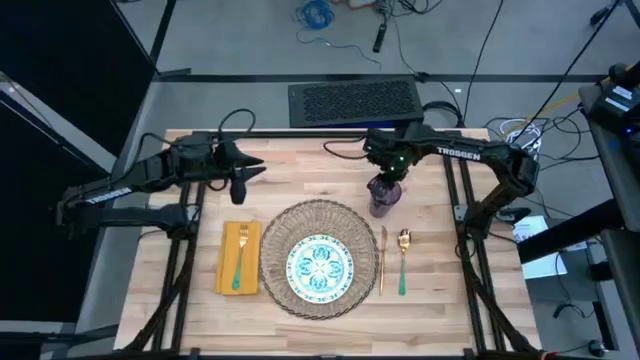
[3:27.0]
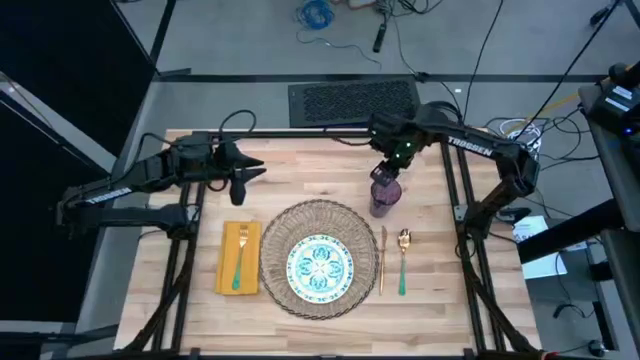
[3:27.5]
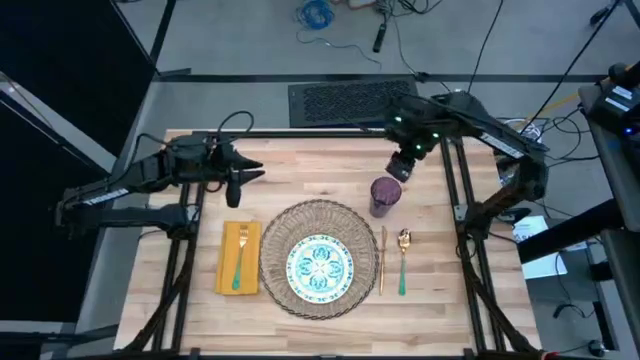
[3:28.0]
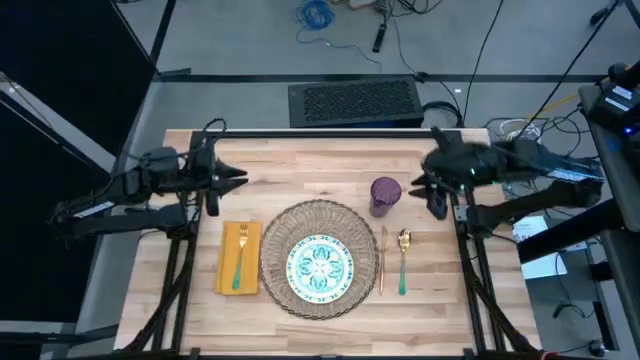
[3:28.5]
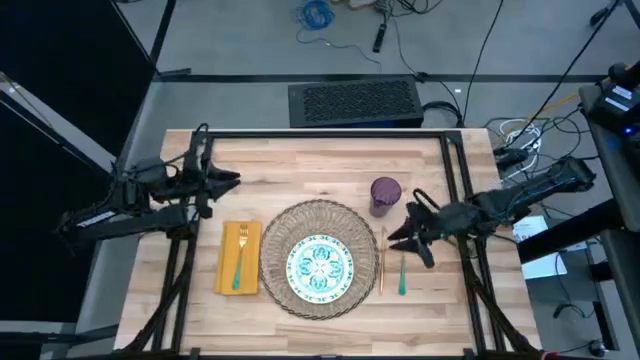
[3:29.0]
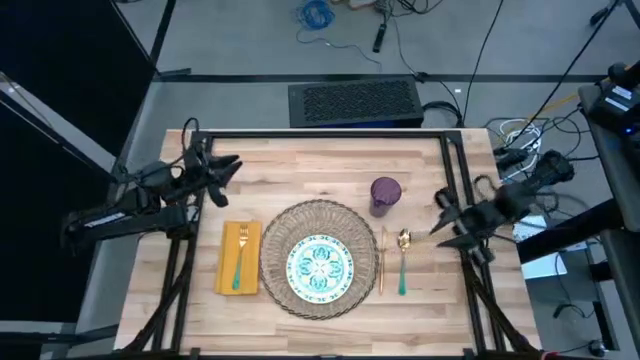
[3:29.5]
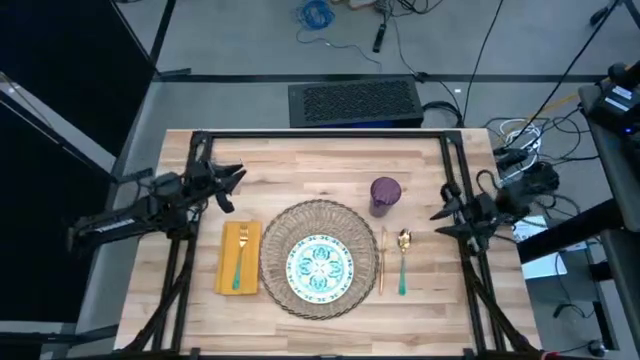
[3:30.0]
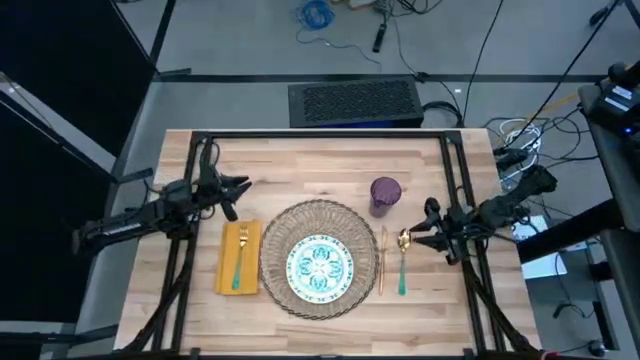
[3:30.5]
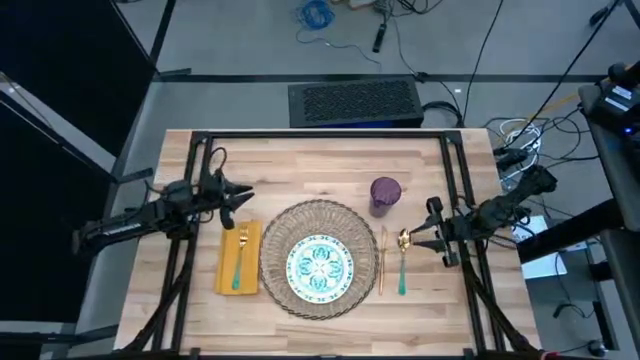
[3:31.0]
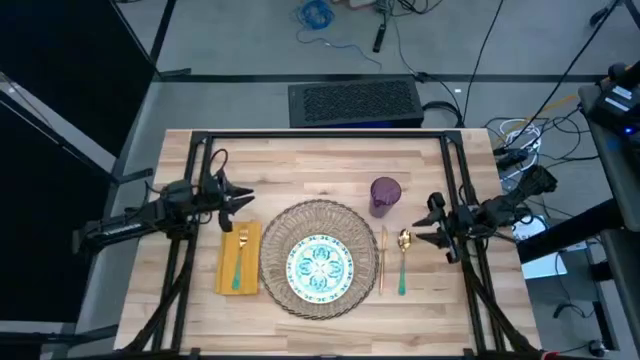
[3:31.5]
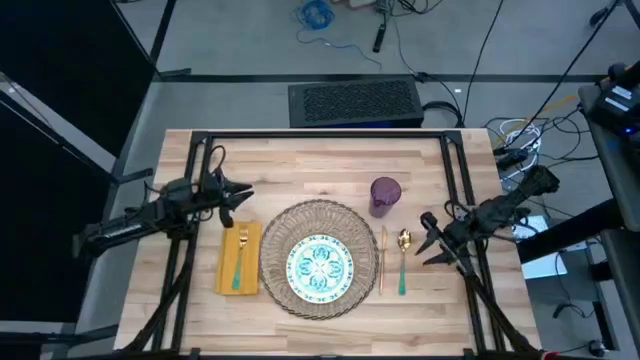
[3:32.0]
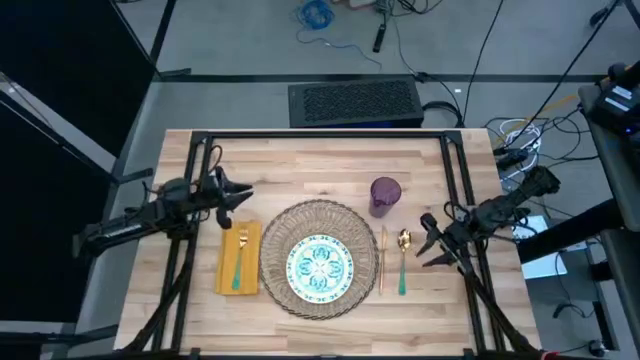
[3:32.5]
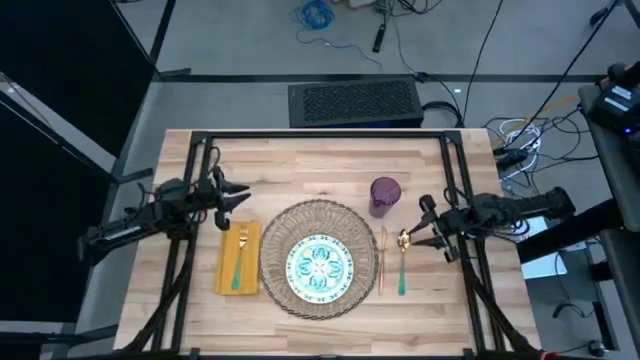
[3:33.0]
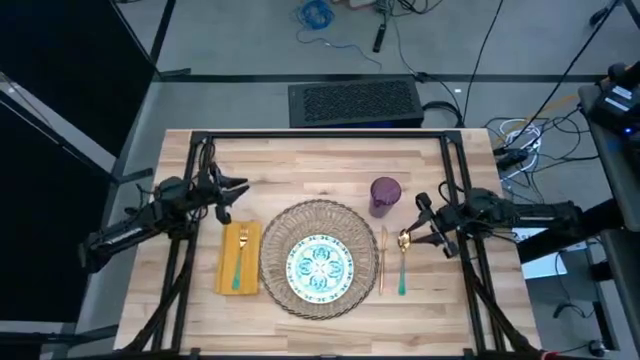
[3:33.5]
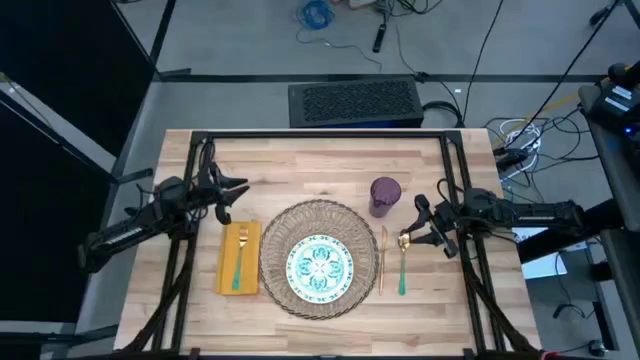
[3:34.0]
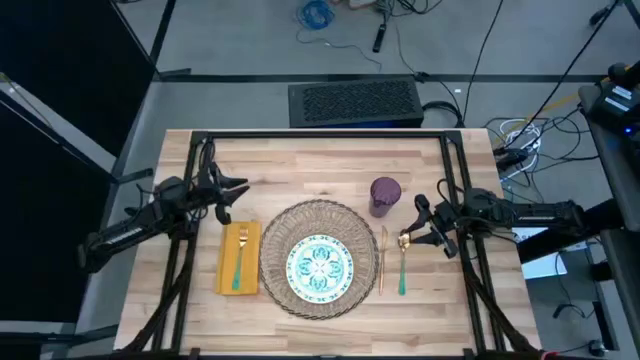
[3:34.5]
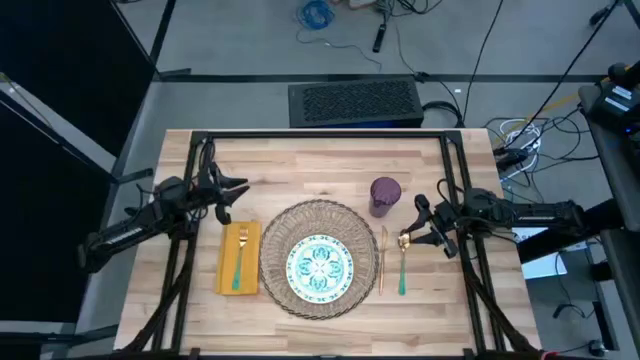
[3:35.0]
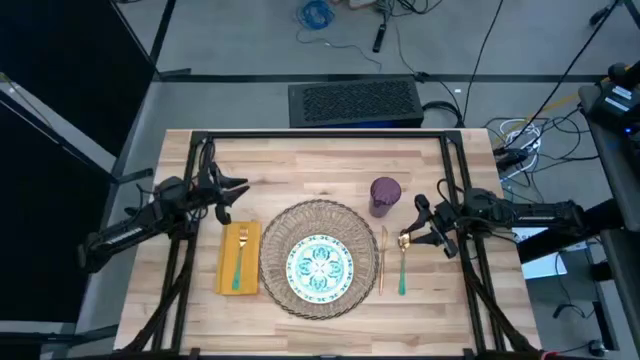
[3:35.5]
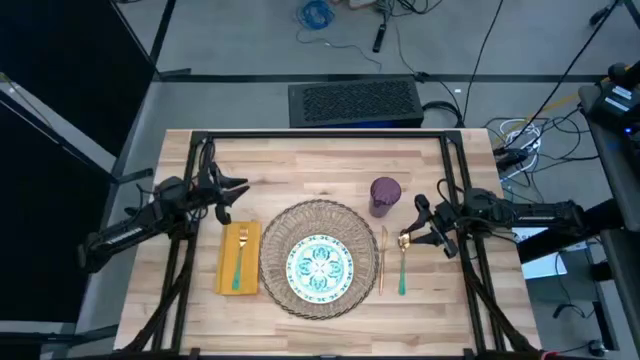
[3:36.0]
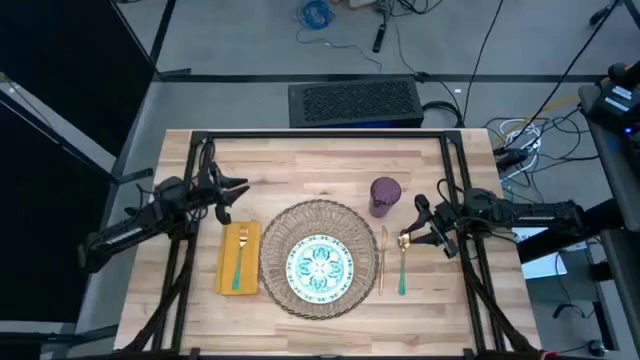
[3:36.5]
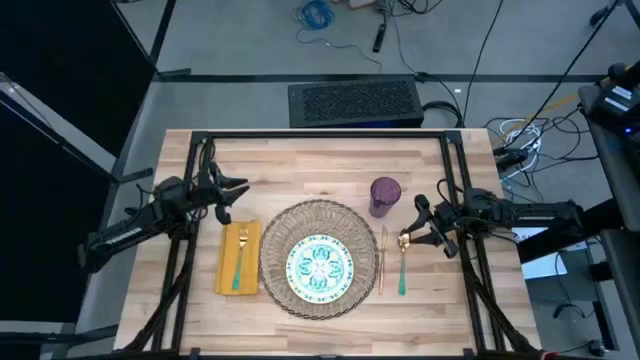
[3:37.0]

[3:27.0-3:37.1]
Task: Set table place
Return to Home Position

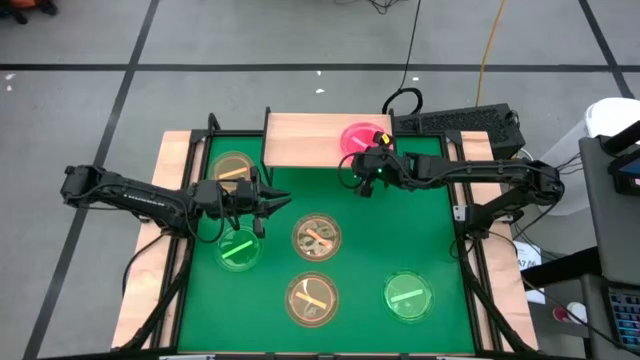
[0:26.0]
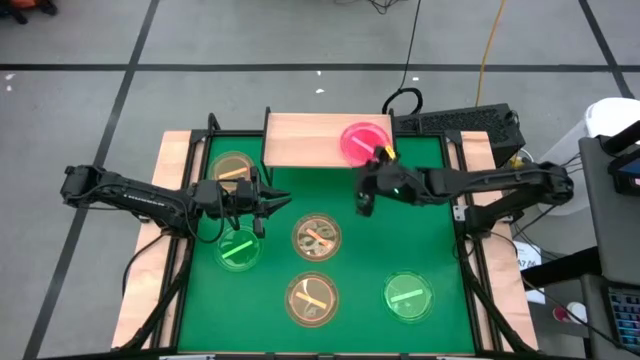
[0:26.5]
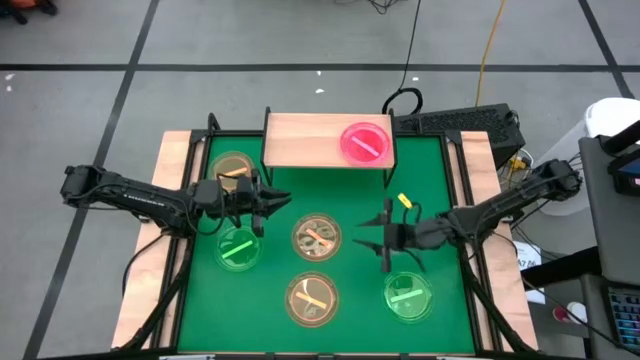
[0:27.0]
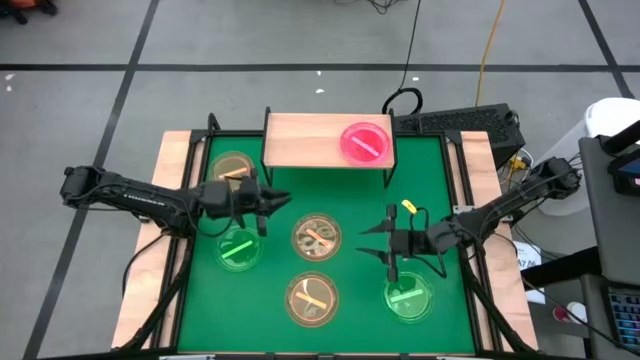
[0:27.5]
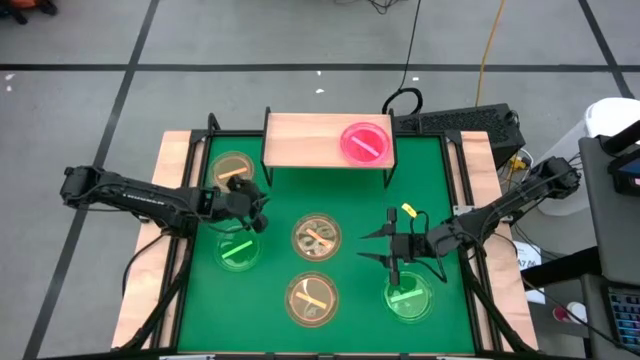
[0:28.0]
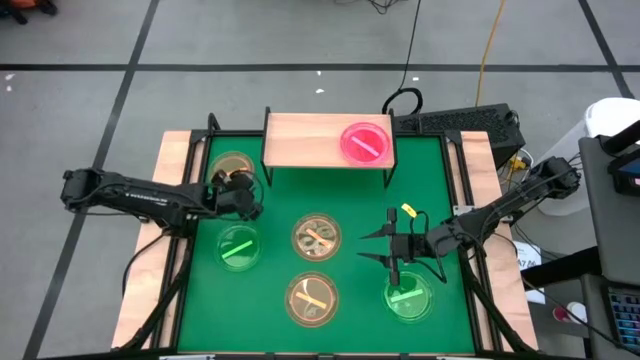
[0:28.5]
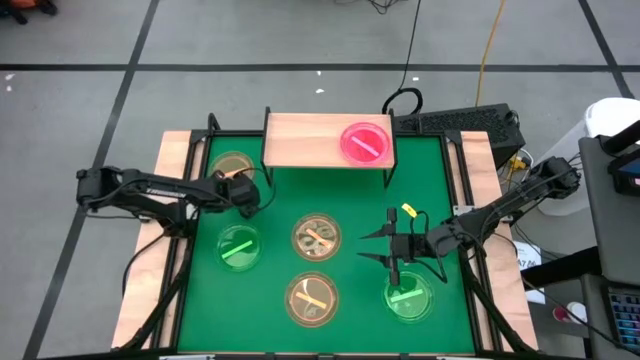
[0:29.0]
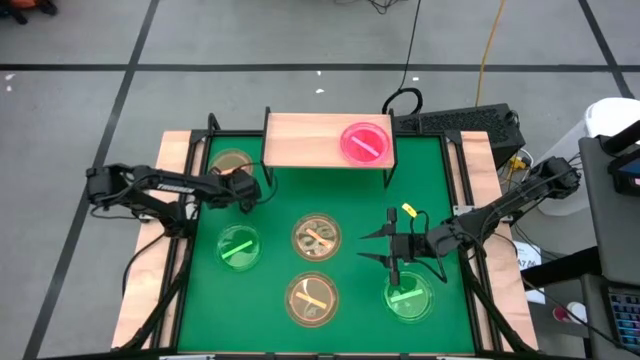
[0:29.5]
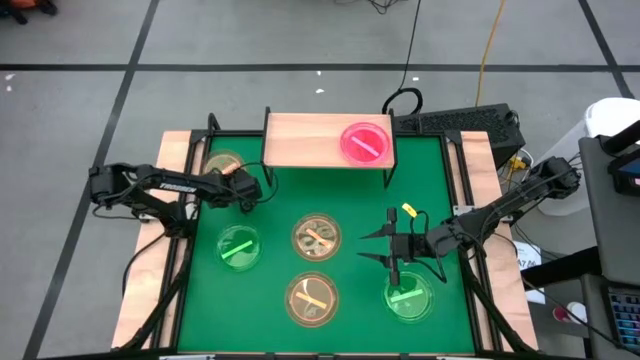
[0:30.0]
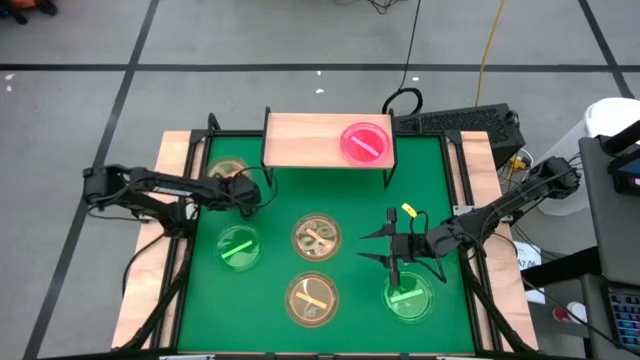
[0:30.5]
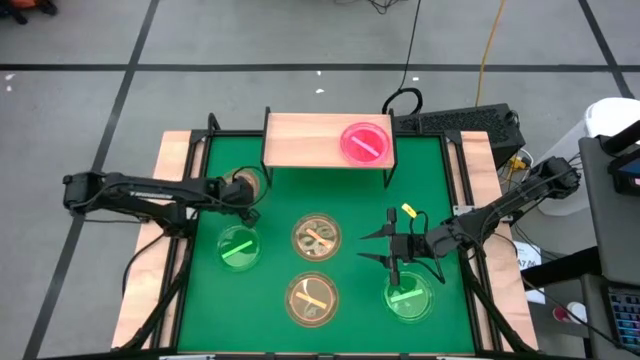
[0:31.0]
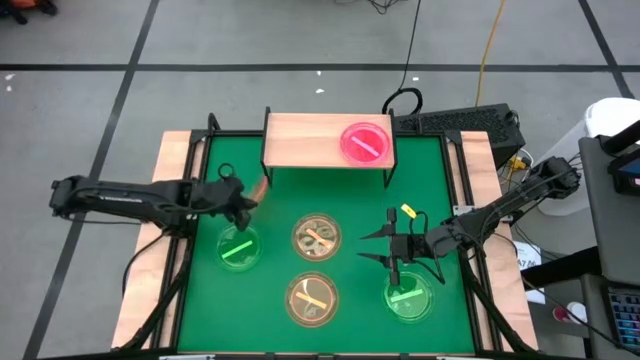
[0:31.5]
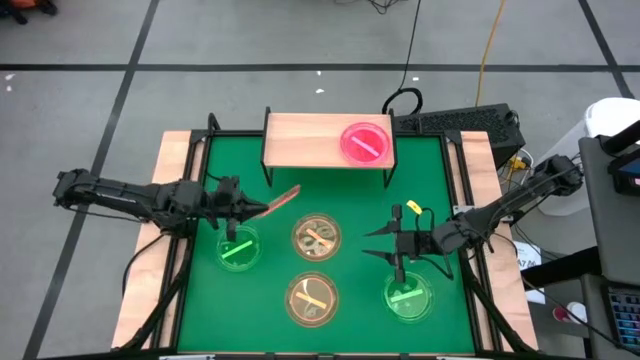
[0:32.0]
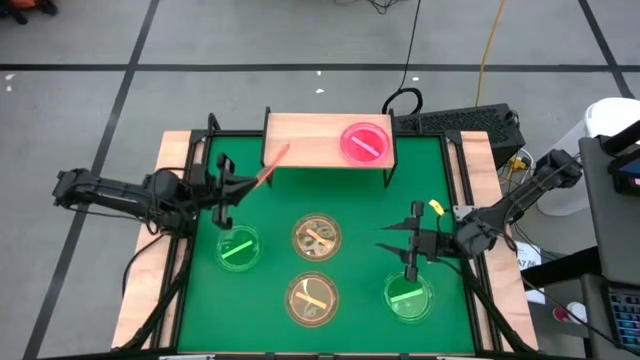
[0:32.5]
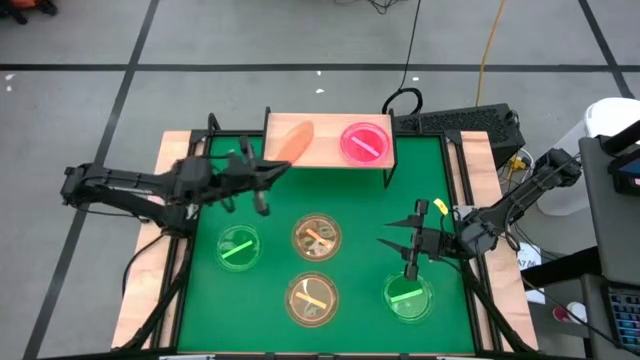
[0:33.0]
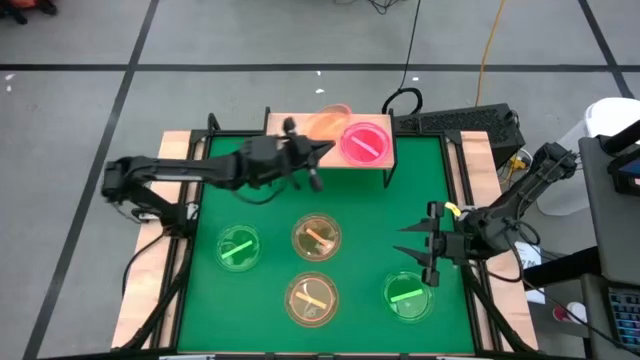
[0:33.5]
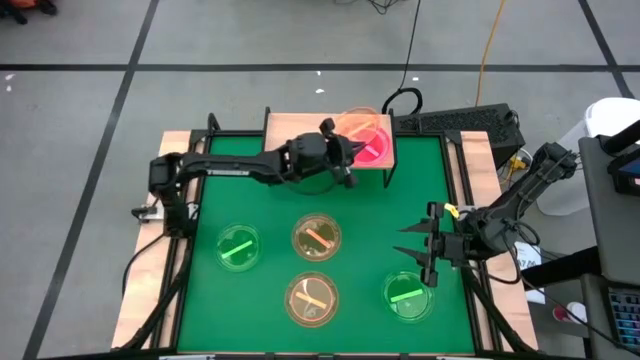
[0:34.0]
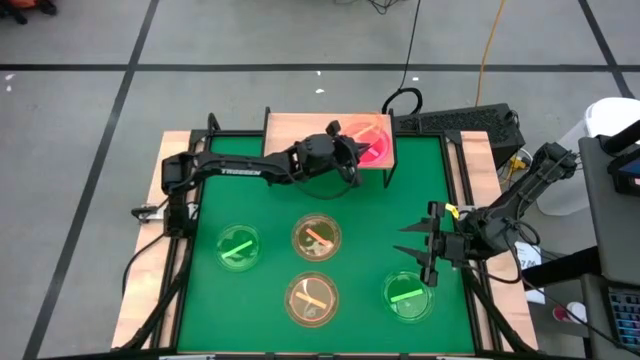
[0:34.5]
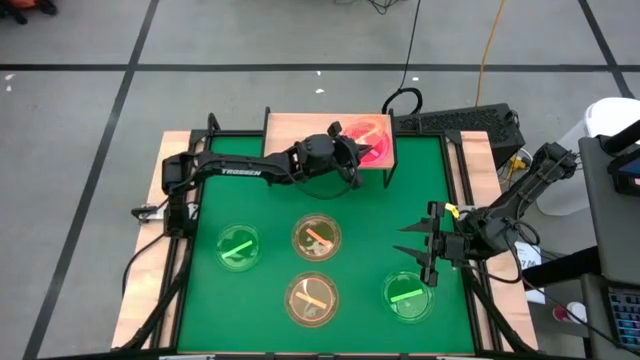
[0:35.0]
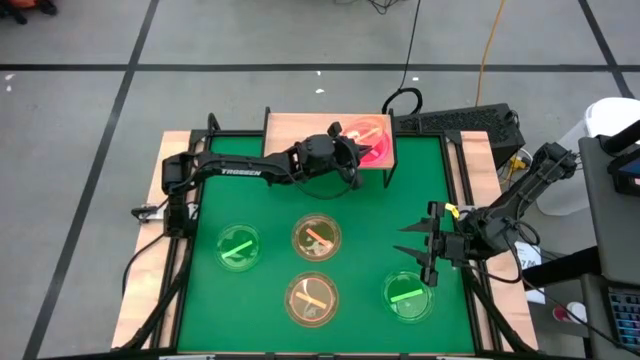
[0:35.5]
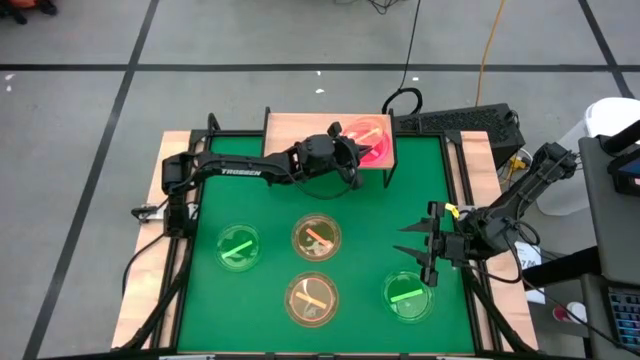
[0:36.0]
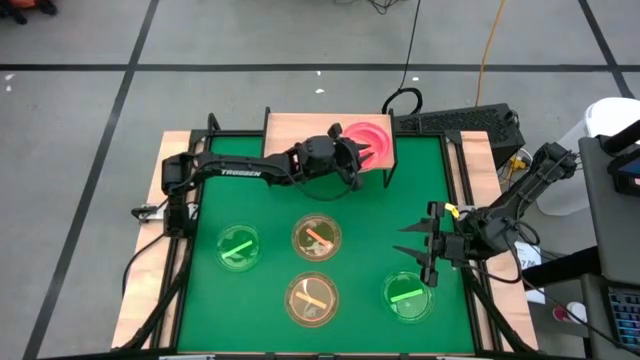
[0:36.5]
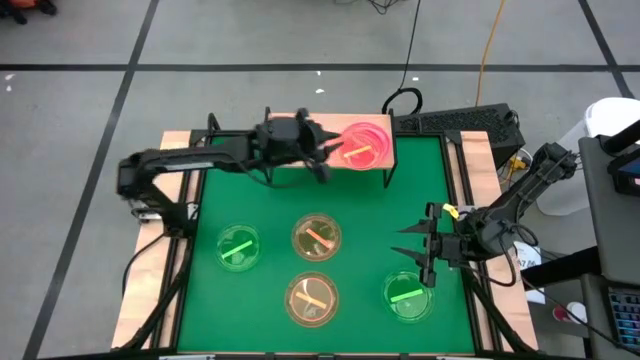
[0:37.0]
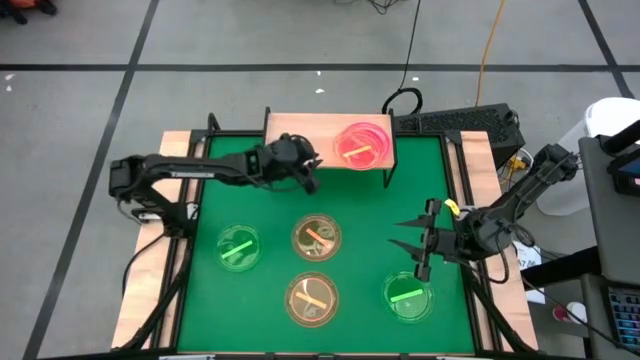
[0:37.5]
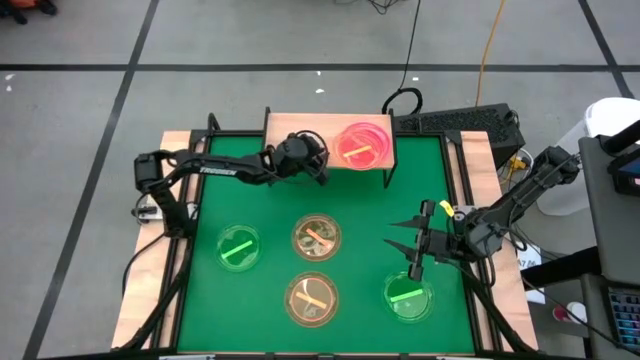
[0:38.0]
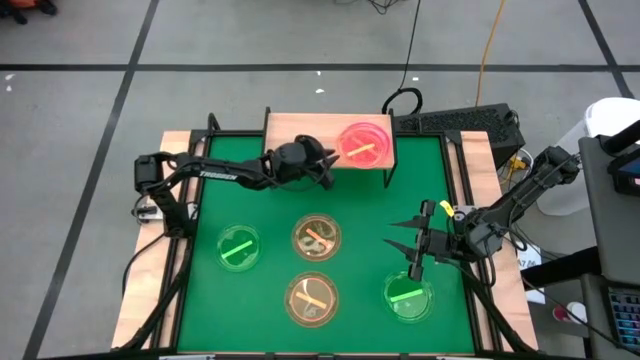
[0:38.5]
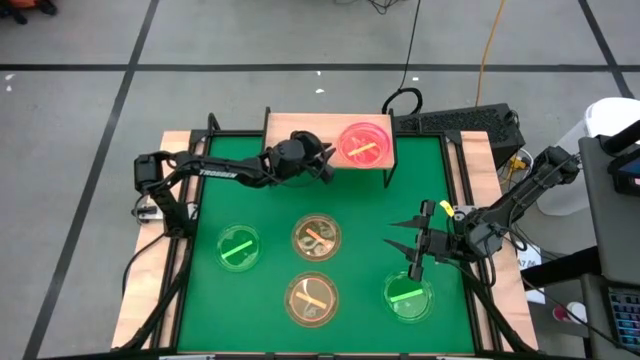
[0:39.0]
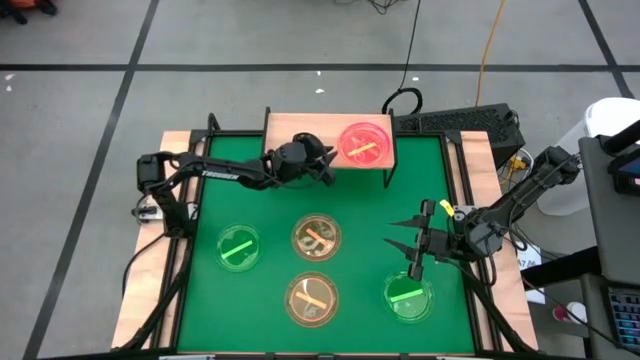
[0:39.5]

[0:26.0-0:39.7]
Task: Place and stack plates onto a shelf
Stack the top orange plate on top of the pink plate on the shelf
